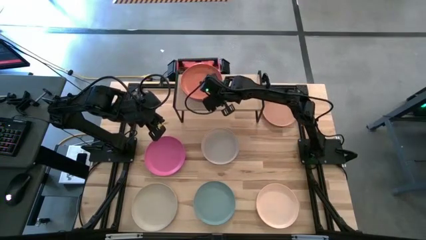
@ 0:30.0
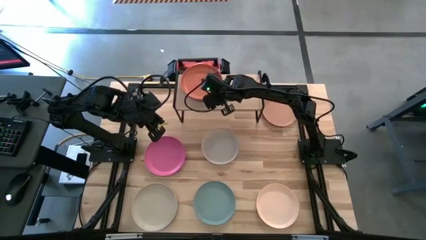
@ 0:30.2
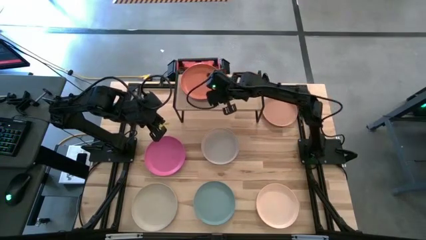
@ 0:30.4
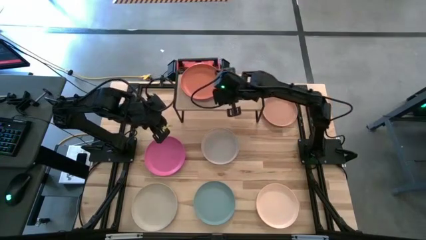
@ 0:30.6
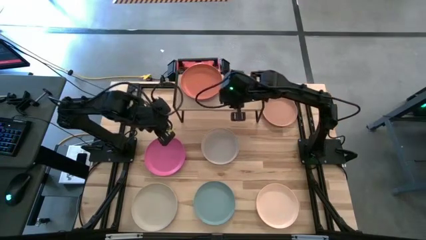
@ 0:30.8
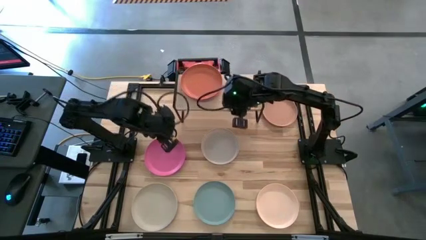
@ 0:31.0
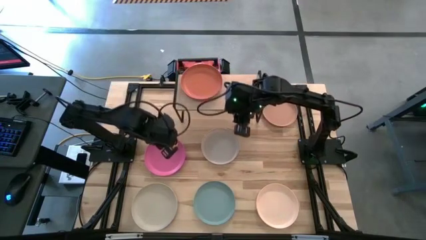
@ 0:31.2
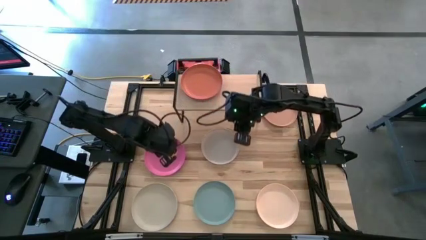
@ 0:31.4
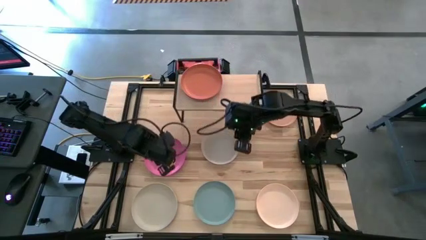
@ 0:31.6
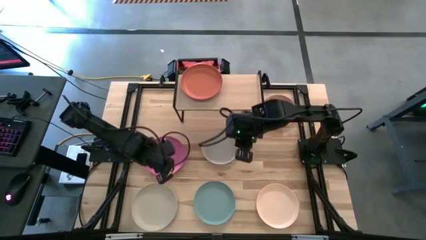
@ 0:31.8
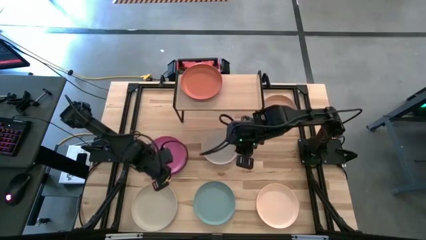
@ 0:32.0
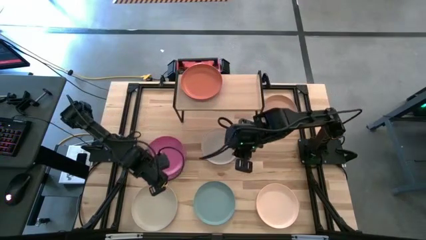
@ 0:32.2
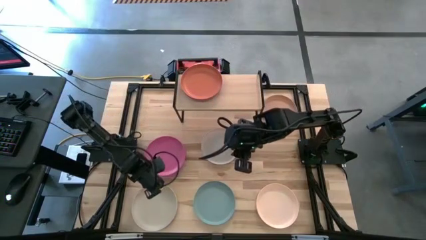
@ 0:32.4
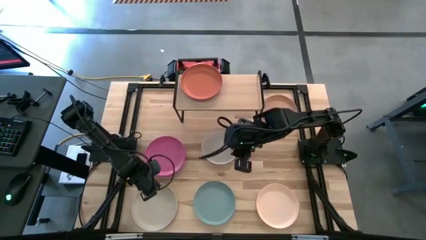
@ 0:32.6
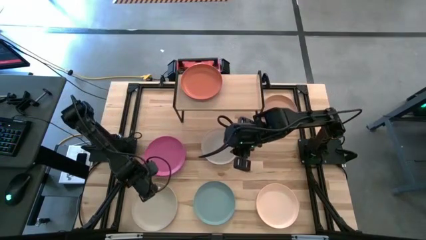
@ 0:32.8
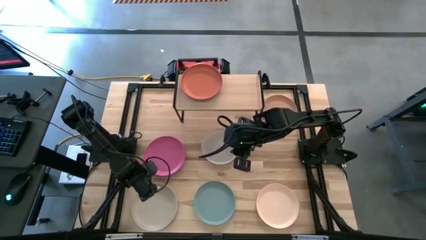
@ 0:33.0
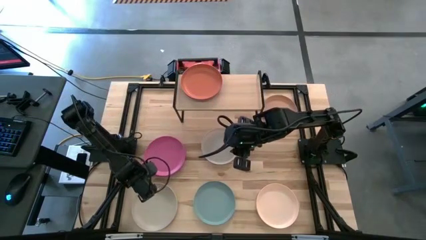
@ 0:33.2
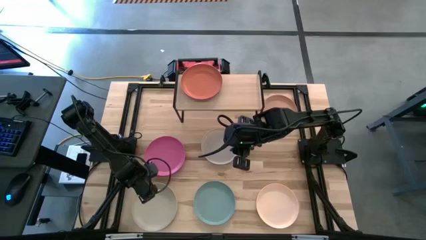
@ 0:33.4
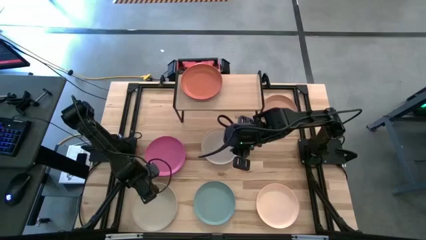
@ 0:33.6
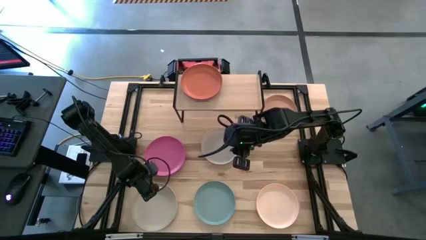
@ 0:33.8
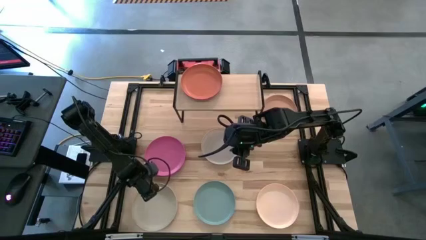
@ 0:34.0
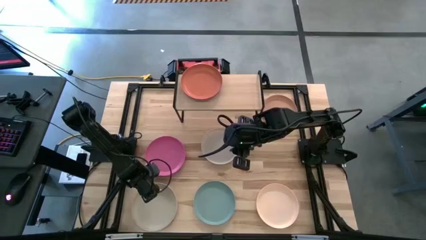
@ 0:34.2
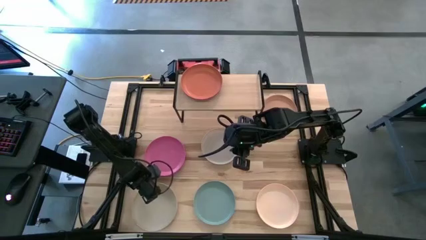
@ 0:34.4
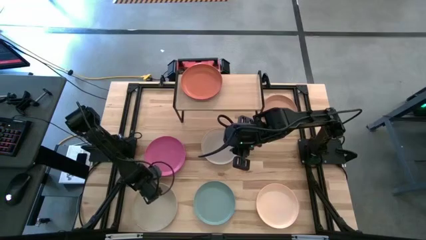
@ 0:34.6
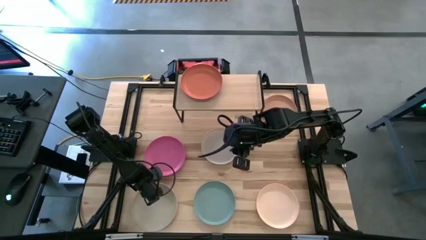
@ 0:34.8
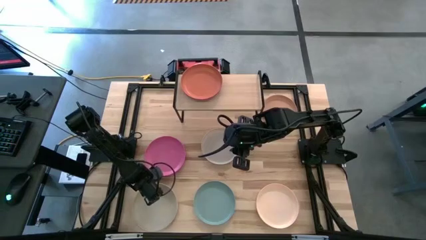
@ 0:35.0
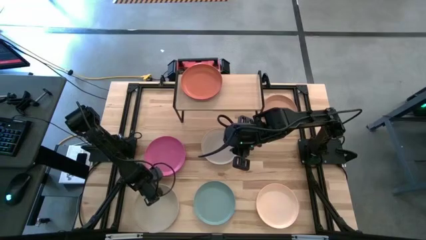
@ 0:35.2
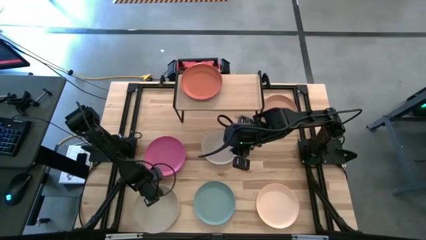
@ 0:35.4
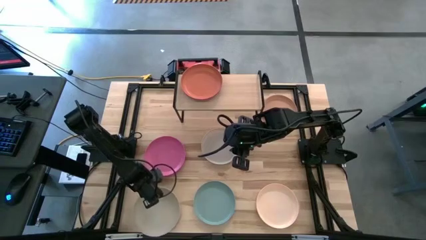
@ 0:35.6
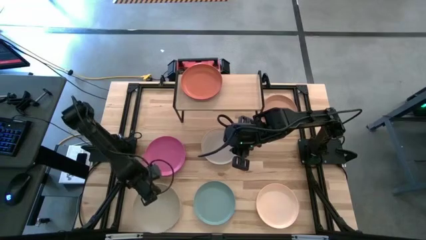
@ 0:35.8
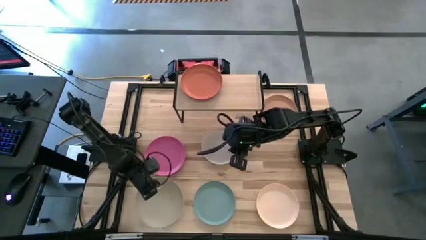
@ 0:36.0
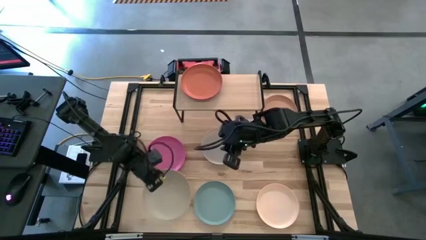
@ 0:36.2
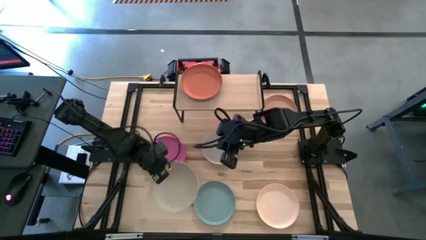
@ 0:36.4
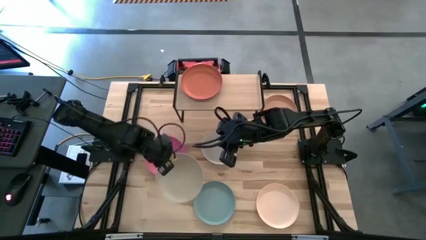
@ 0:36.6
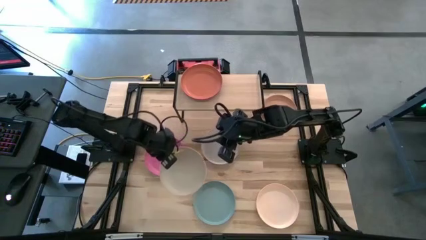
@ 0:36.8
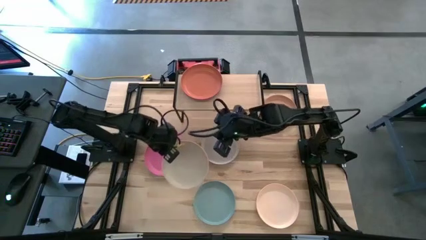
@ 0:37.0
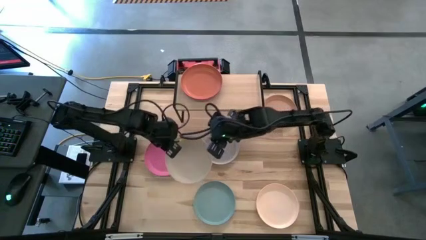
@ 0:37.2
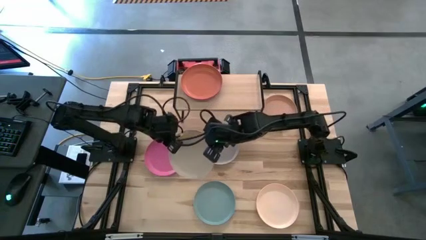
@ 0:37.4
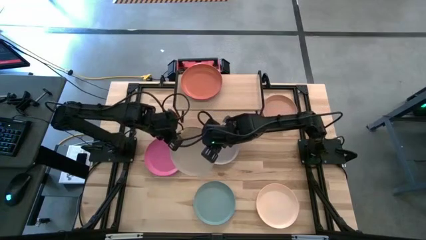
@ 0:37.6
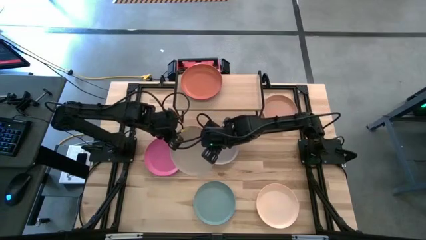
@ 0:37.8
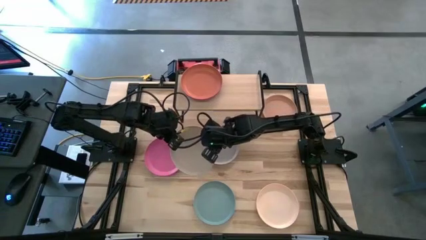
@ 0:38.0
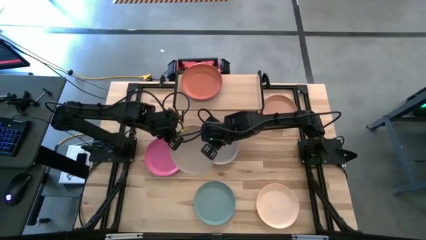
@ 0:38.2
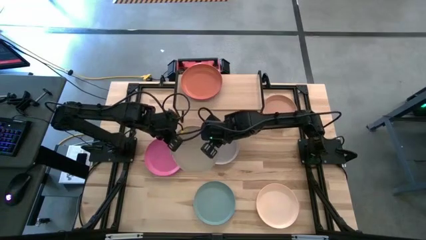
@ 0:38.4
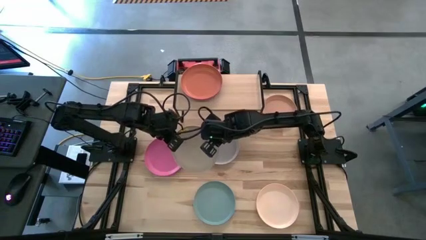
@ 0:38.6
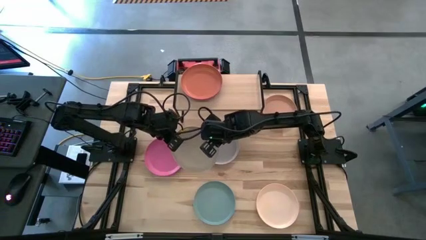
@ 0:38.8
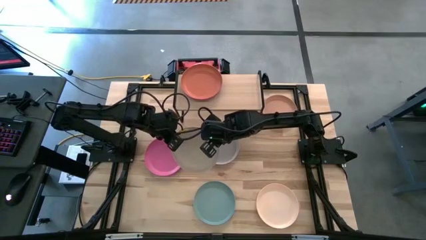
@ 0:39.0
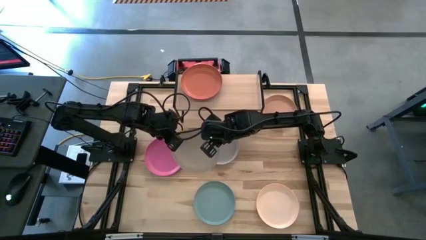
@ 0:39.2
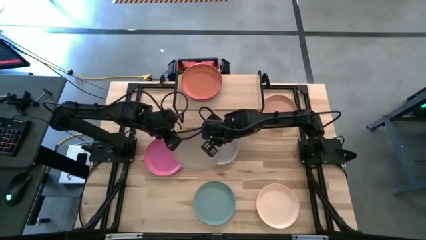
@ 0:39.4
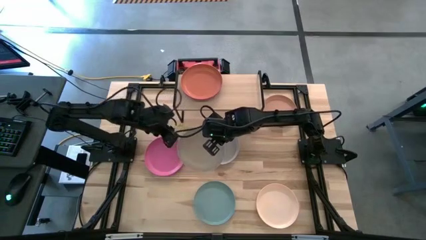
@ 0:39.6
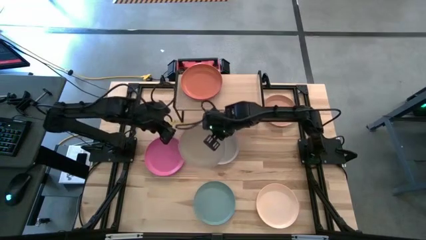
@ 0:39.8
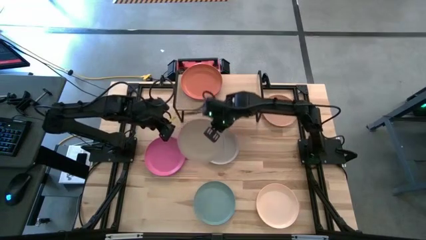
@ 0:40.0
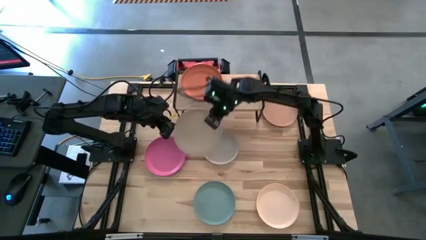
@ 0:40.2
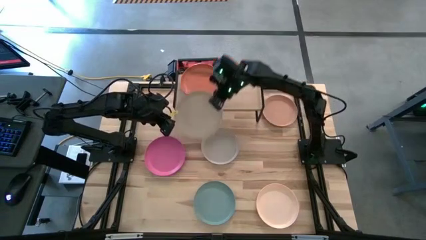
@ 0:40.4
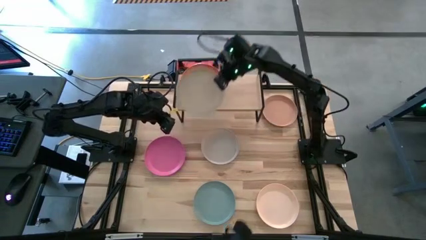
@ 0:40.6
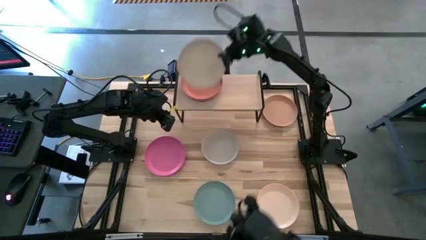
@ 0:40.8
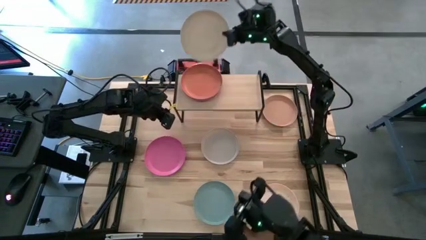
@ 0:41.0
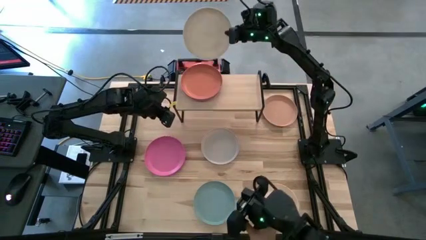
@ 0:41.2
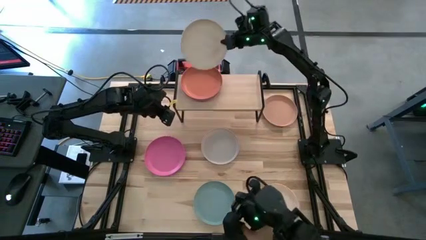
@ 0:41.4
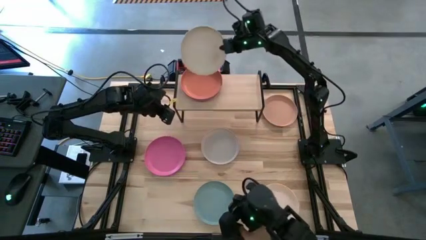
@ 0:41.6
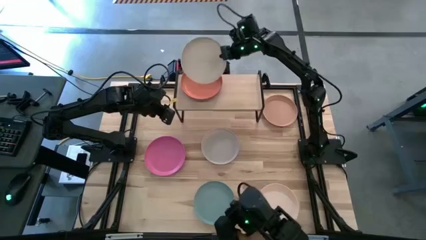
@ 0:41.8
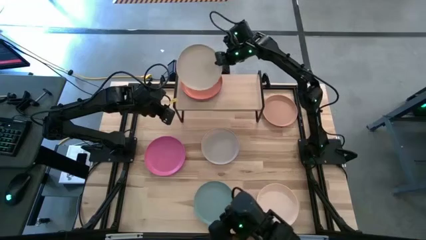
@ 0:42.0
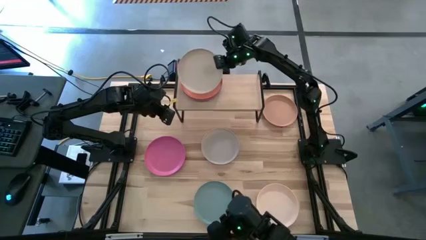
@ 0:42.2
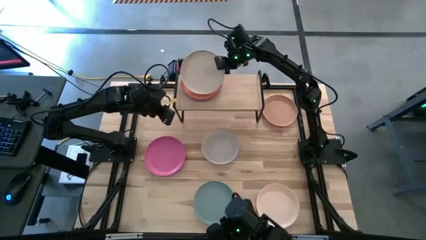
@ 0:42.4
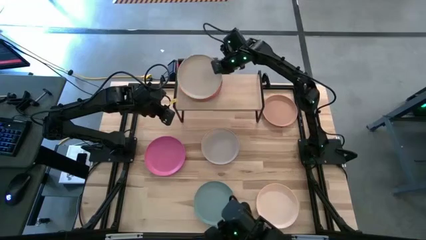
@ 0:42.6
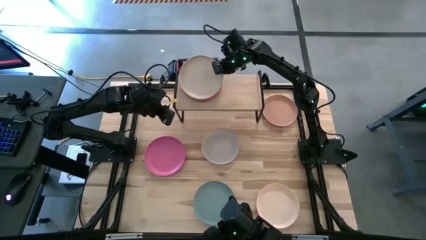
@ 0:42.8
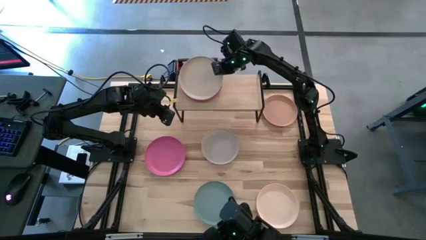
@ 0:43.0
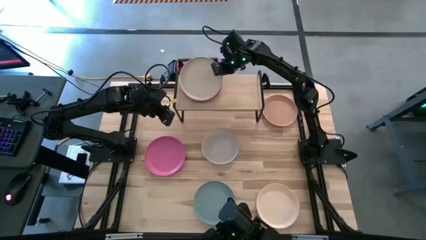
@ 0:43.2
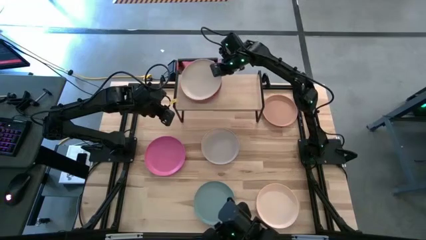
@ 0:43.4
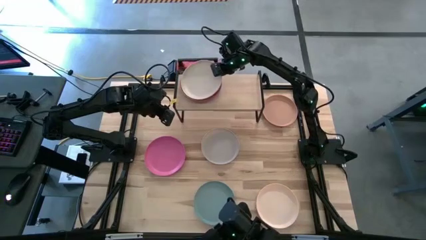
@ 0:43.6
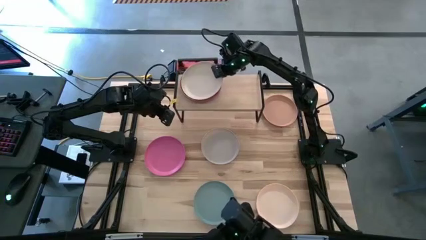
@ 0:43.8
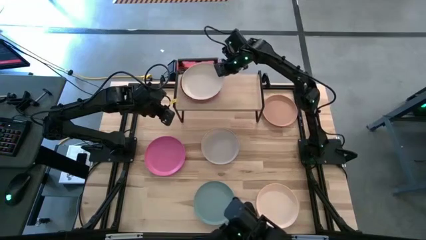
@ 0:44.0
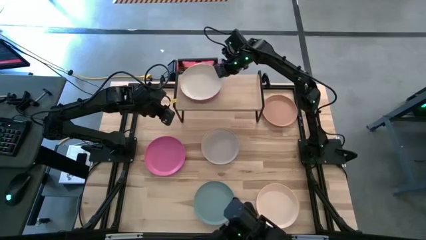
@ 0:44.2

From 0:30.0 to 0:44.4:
Task: Place and stack plates onto a shelf
Stack the gray plate on top of the orange plate on the shelf
